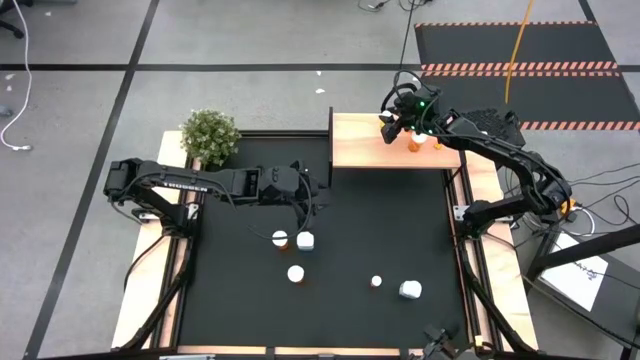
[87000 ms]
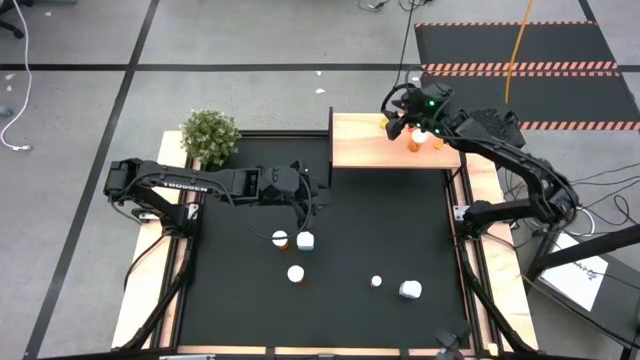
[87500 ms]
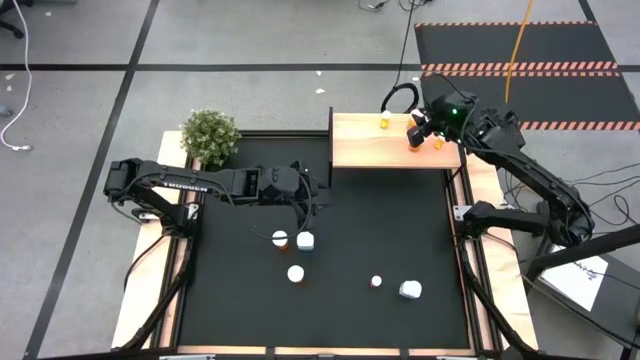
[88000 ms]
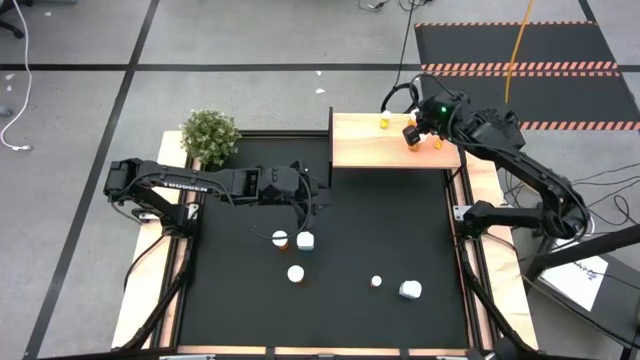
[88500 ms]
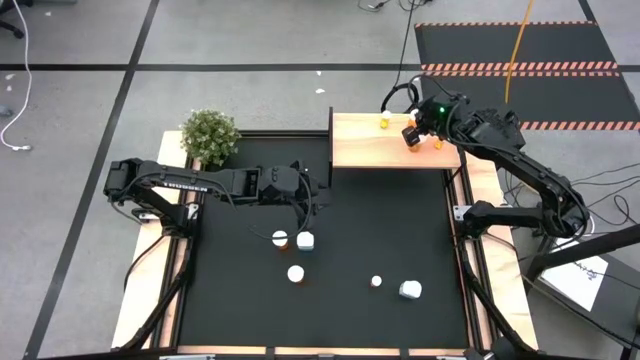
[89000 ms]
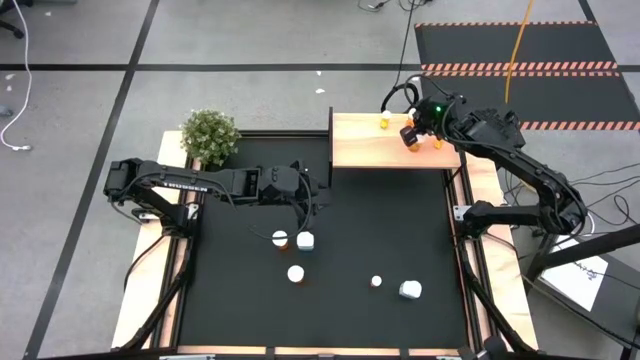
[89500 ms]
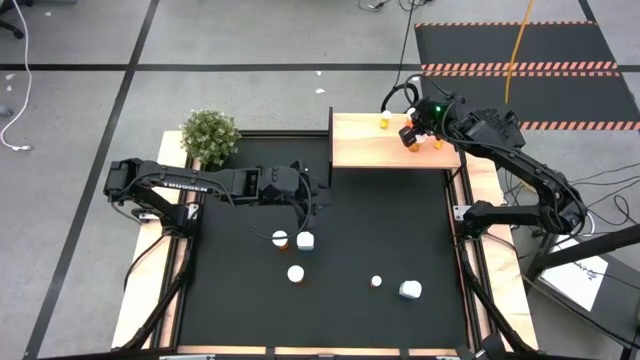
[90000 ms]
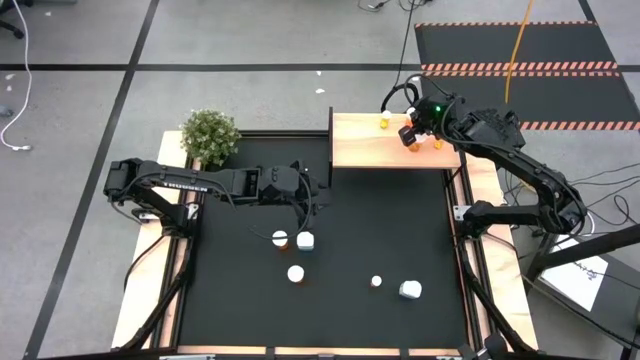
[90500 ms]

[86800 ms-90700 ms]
Task: Pick and place medicine bottles onto shelf by color
Adjust the large orange pill bottle on the shelf

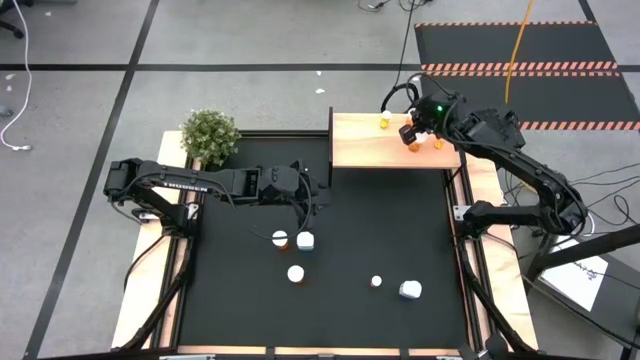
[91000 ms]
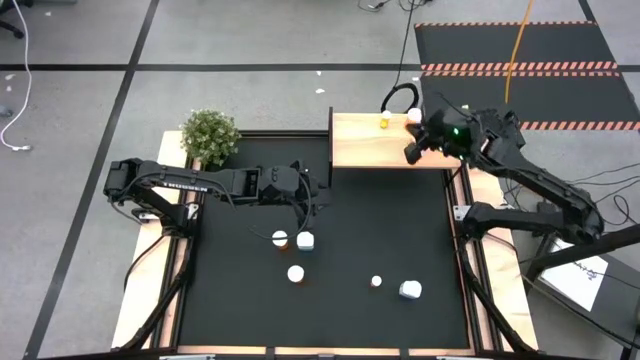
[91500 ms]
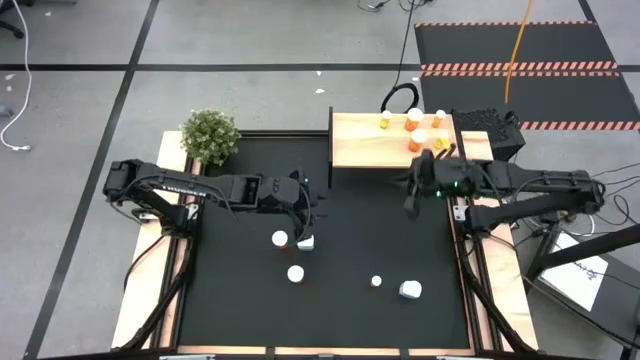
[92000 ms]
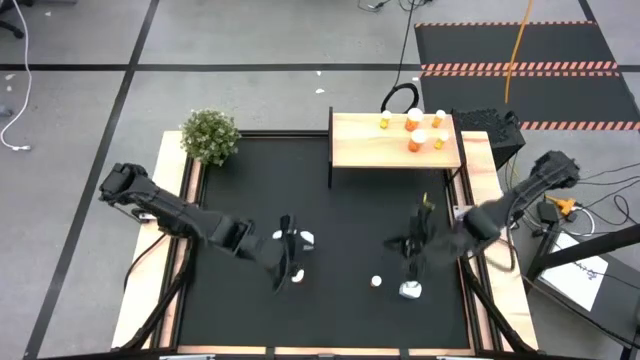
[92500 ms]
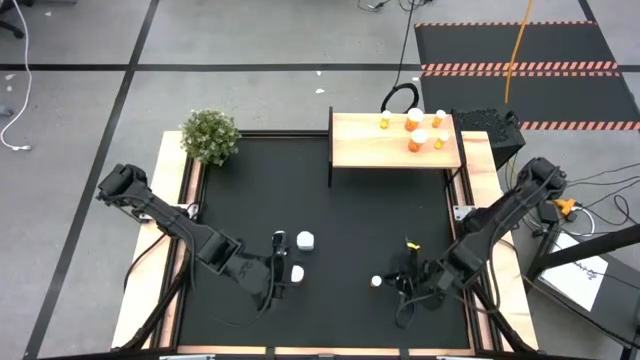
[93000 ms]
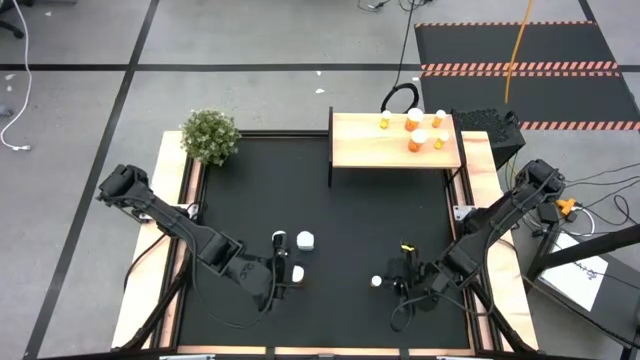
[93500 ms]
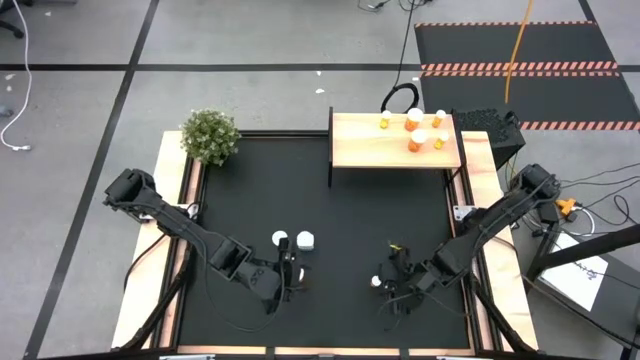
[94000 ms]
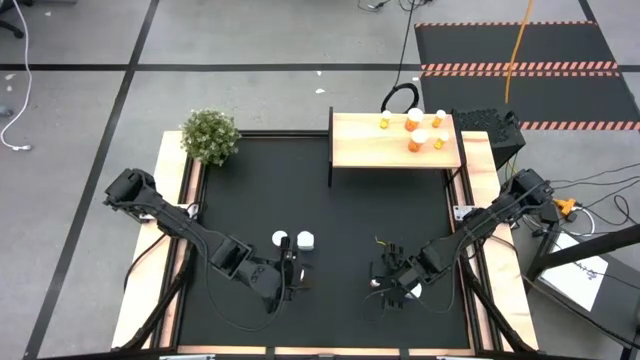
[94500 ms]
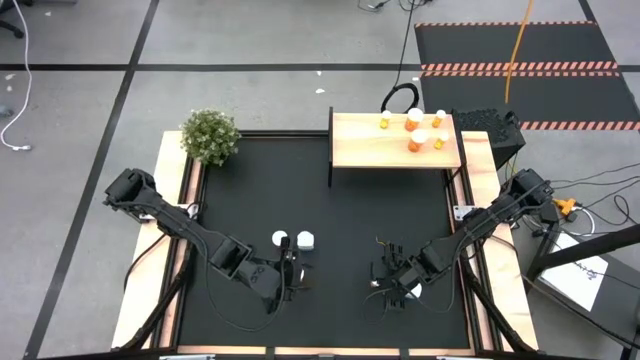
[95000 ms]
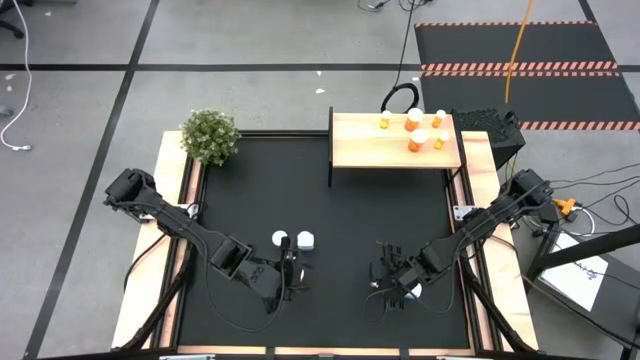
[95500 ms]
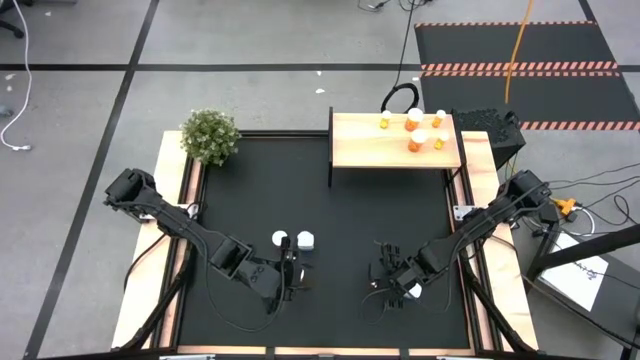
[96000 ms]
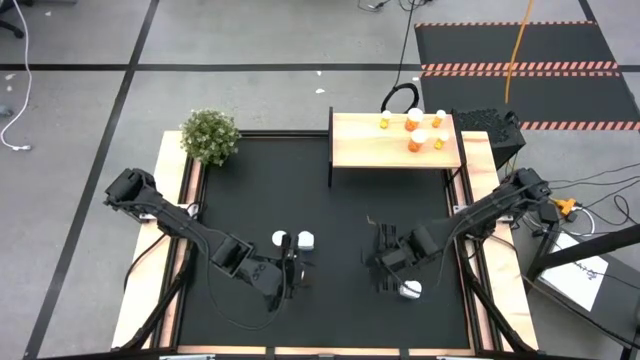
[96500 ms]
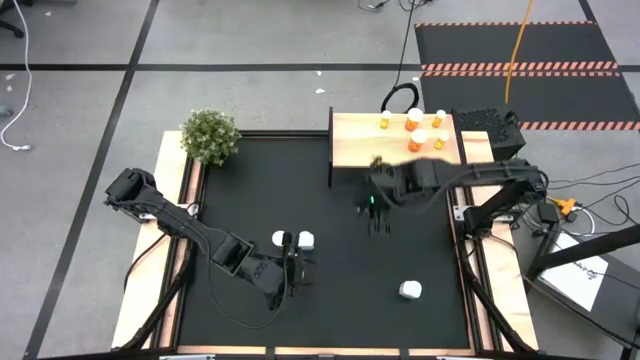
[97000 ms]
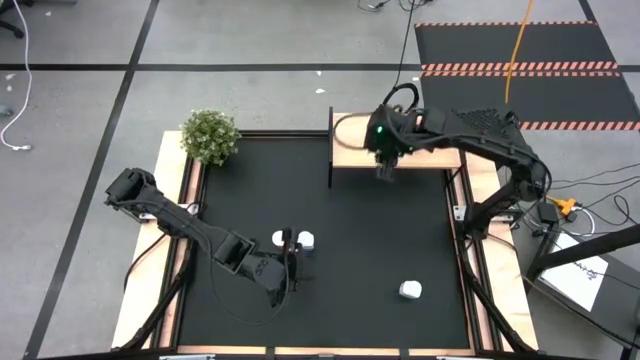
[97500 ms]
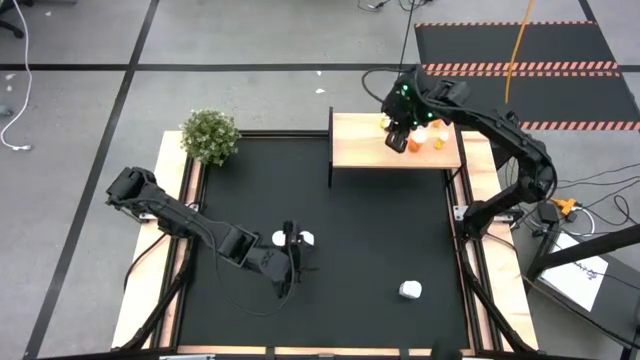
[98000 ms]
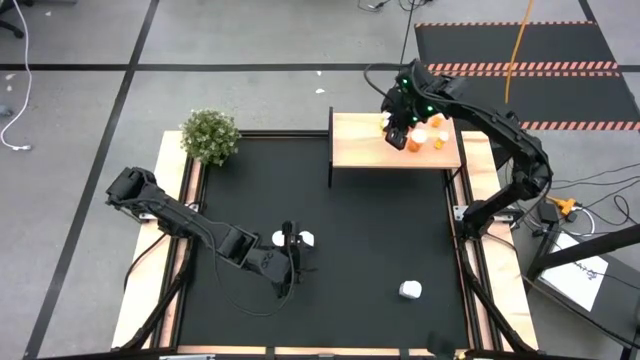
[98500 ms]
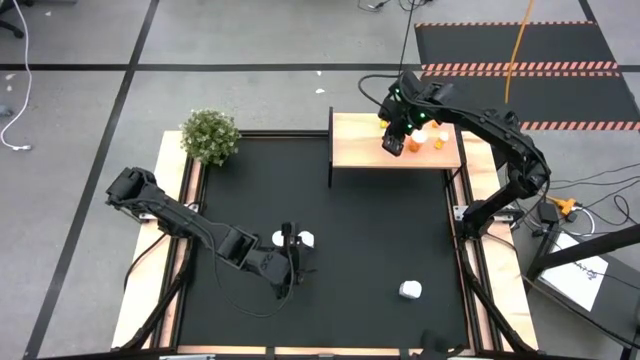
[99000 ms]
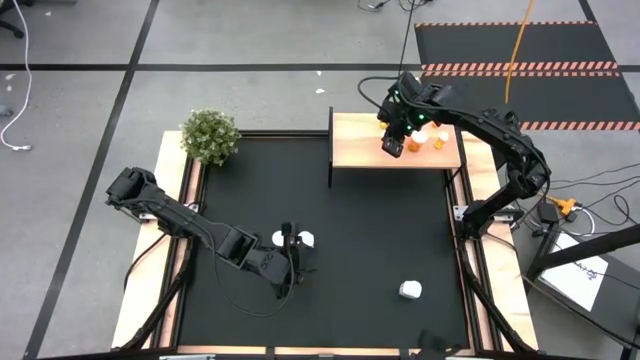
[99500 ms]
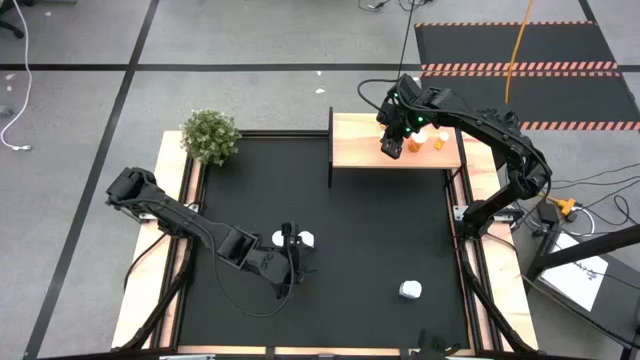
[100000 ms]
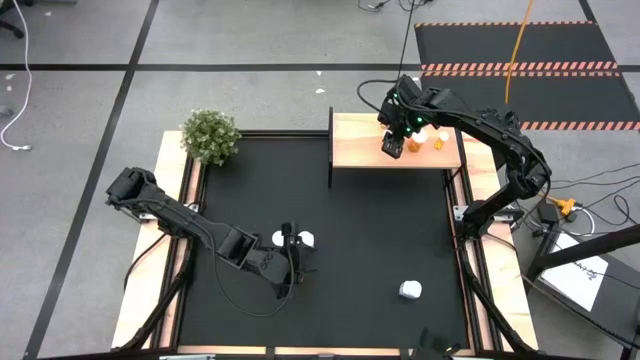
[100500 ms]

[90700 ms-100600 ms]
Put the small orange pill bottle on the shelf

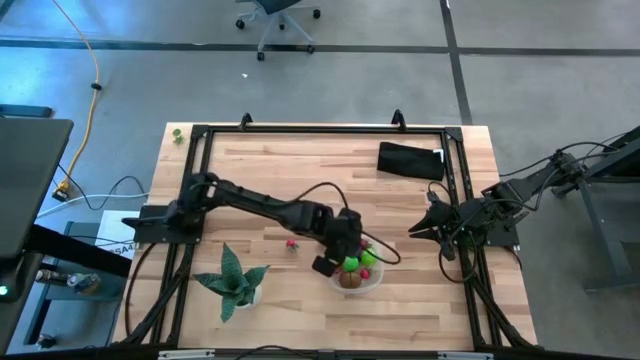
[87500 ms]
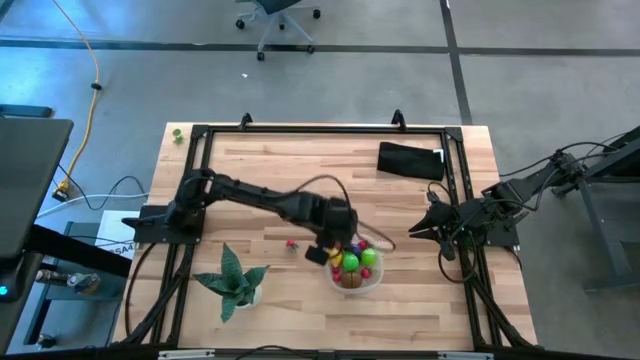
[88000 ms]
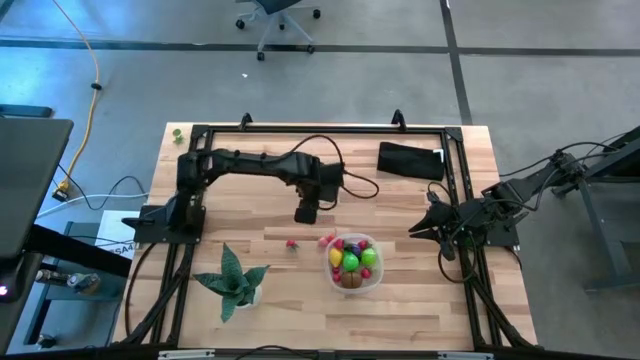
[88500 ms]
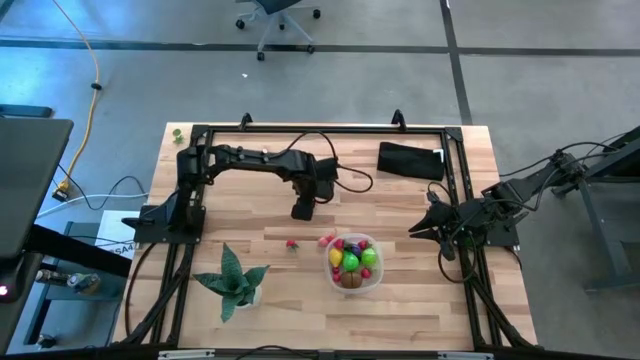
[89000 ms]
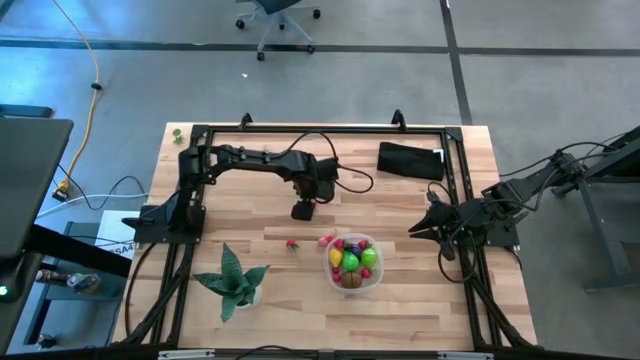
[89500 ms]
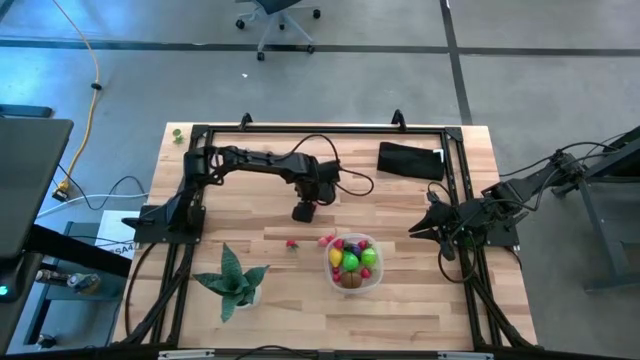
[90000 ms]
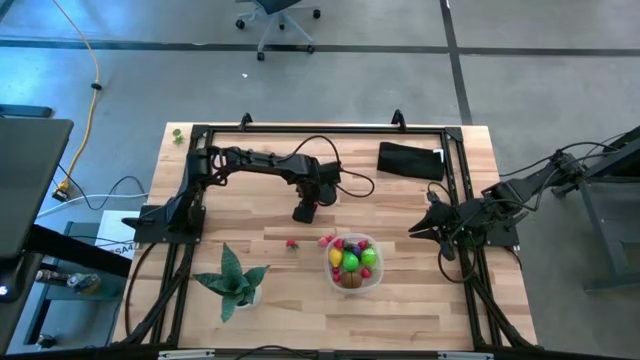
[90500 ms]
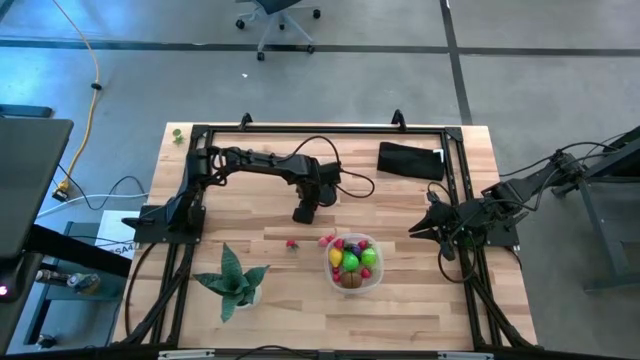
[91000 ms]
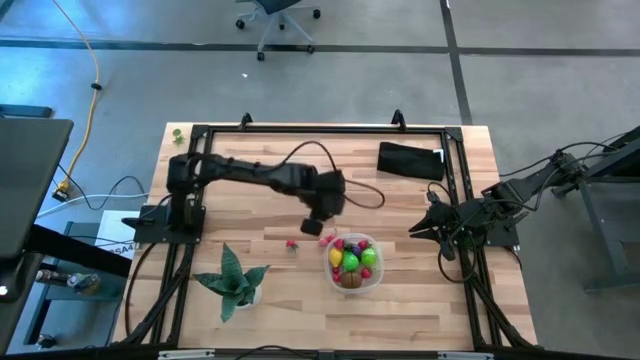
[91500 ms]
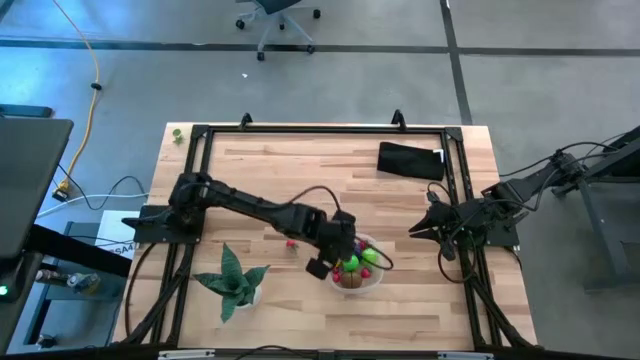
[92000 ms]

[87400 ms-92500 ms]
Task: Pick and placing Produce into tupperware
Put the top apricot into the transparent bin

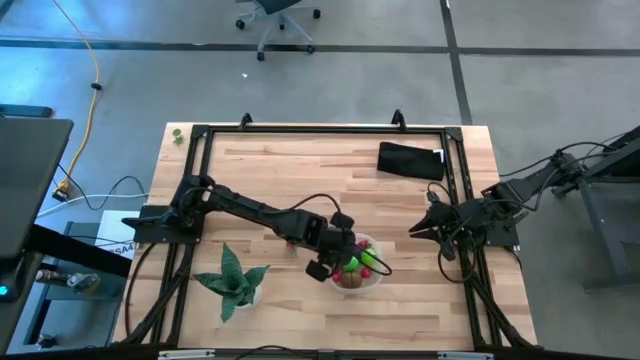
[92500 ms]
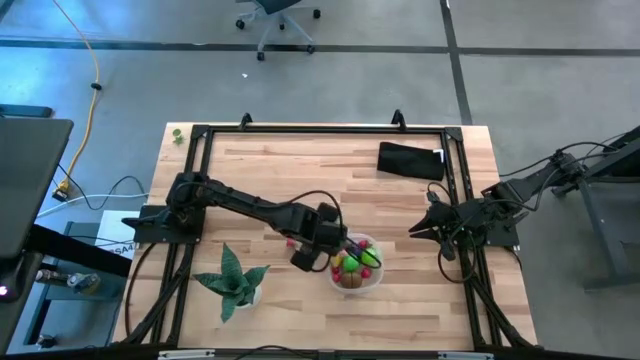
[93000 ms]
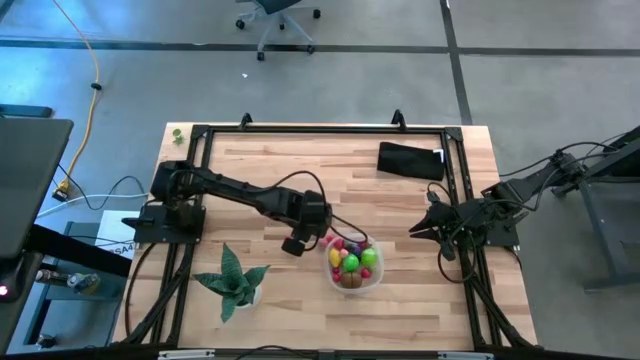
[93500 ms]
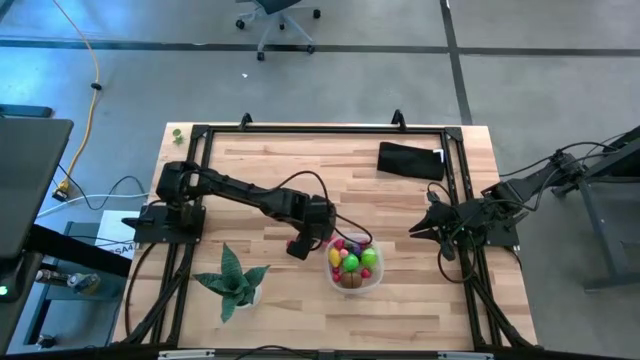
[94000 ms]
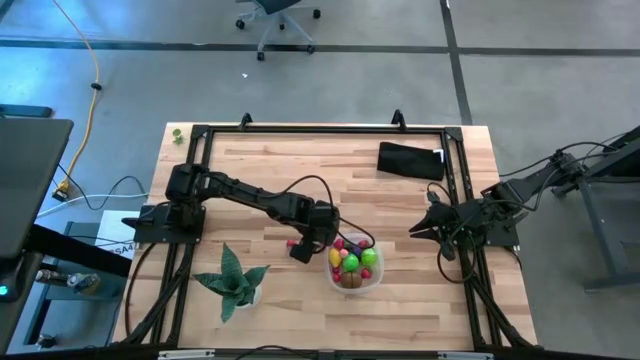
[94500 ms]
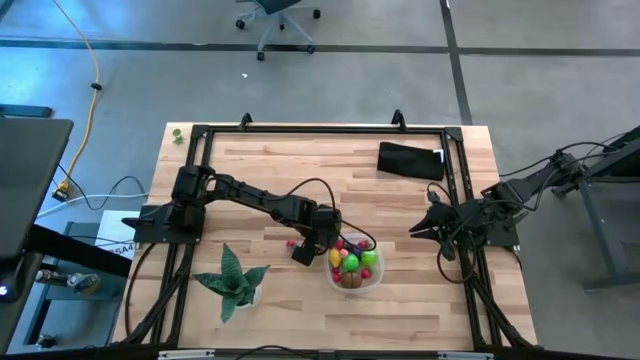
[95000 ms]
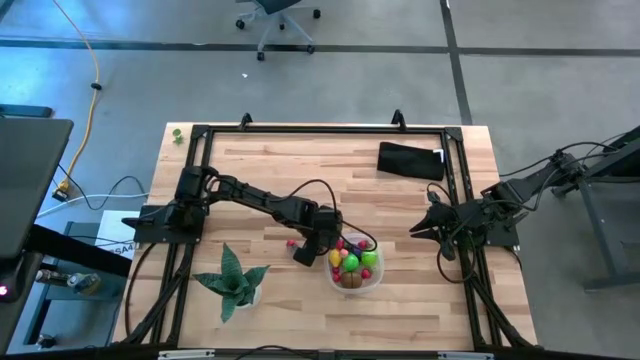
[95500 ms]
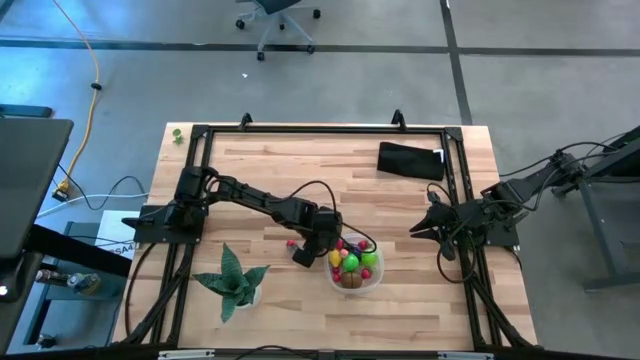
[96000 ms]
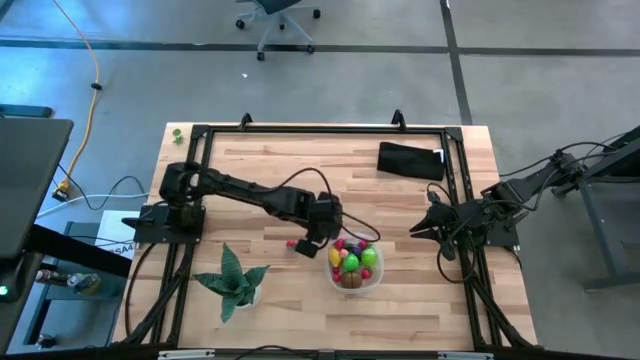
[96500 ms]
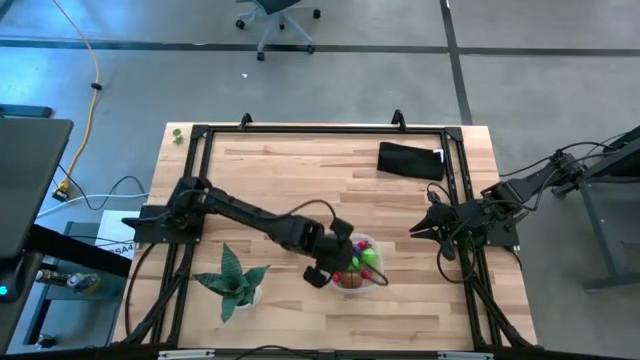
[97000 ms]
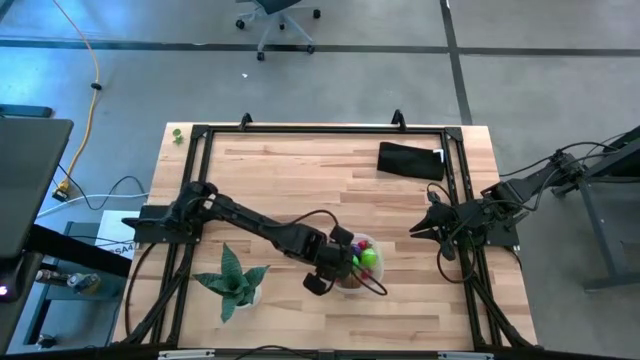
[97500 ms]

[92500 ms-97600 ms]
Put the apricot into the transparent bin
